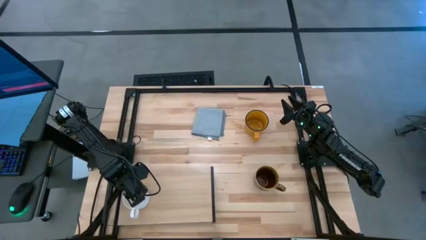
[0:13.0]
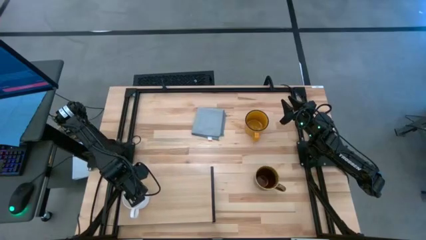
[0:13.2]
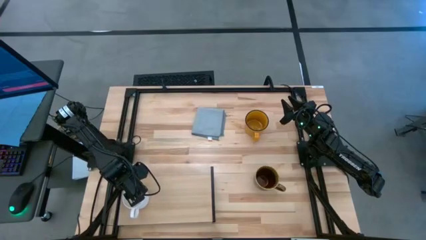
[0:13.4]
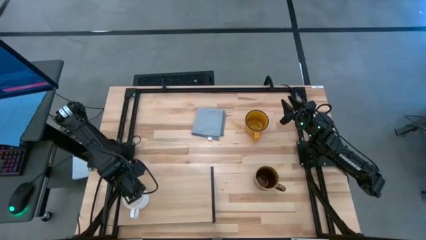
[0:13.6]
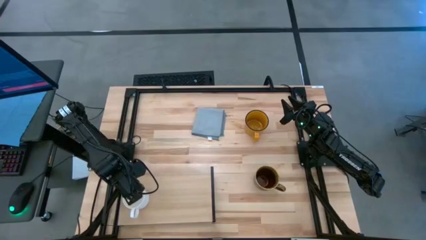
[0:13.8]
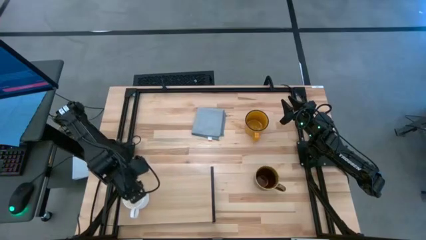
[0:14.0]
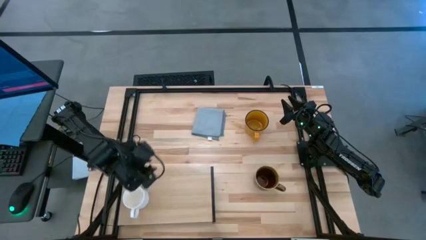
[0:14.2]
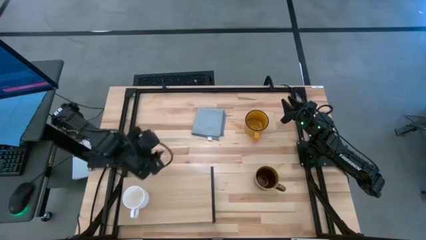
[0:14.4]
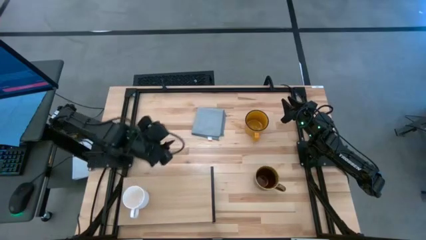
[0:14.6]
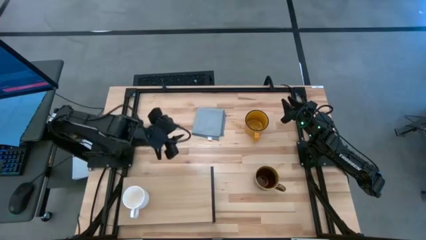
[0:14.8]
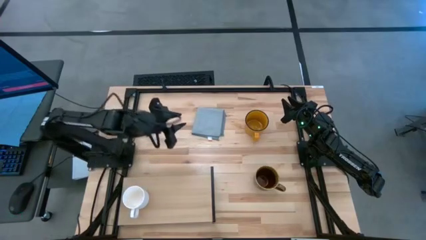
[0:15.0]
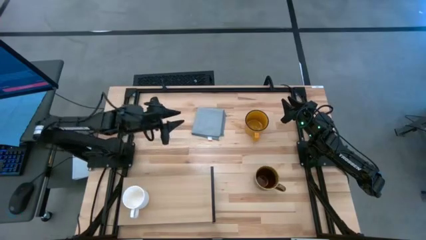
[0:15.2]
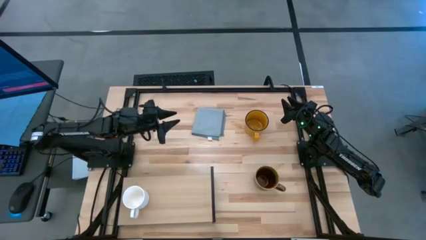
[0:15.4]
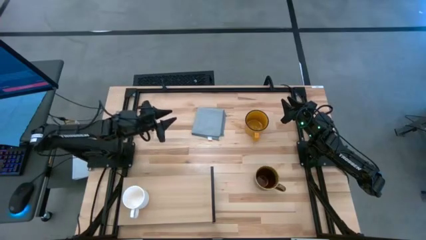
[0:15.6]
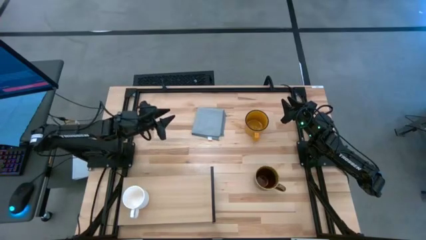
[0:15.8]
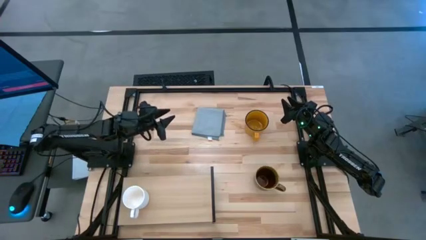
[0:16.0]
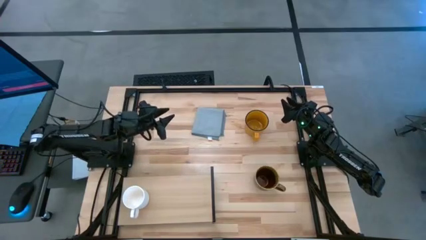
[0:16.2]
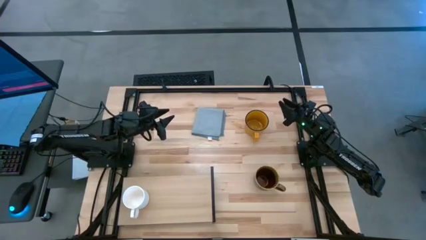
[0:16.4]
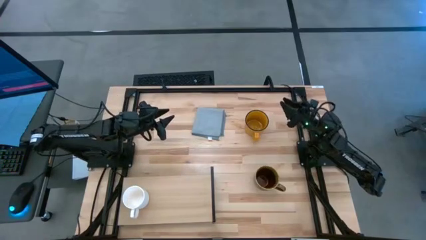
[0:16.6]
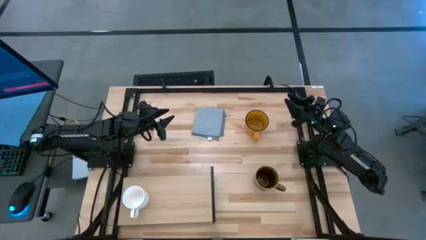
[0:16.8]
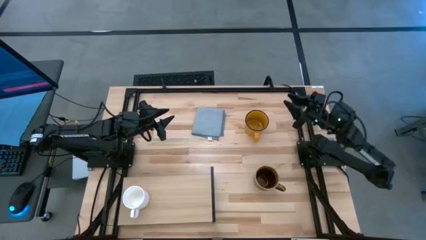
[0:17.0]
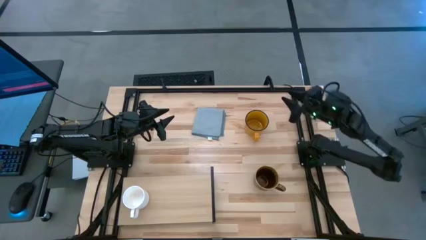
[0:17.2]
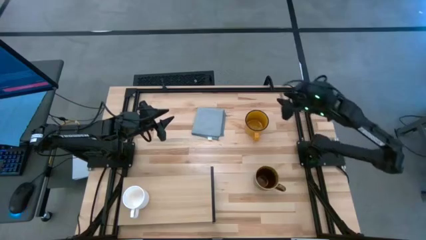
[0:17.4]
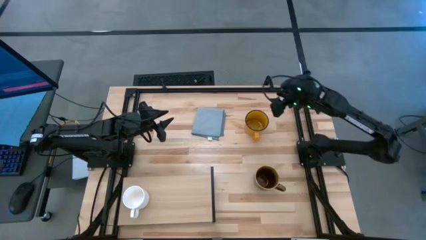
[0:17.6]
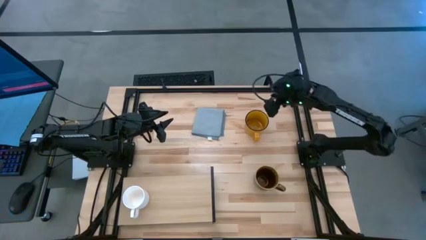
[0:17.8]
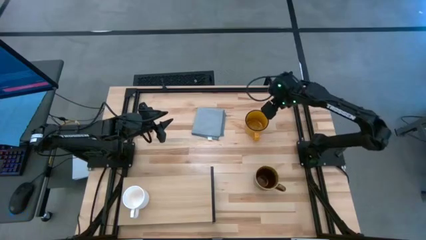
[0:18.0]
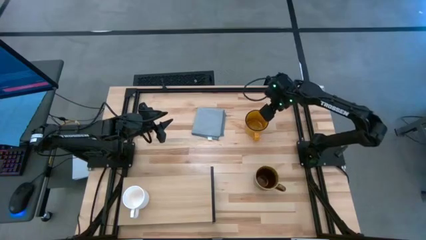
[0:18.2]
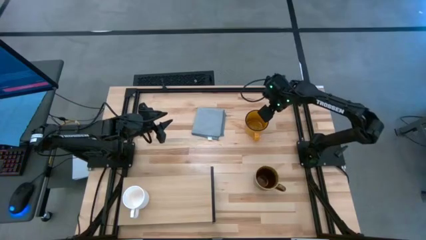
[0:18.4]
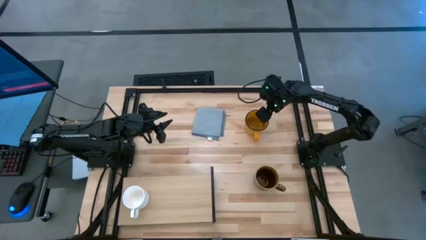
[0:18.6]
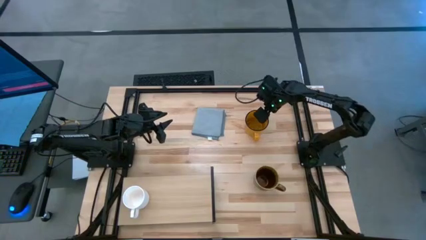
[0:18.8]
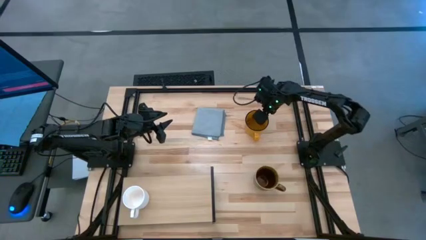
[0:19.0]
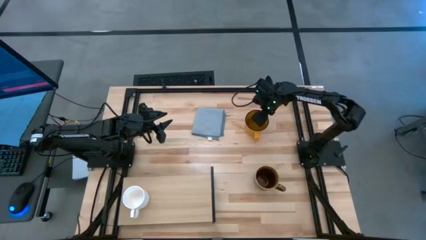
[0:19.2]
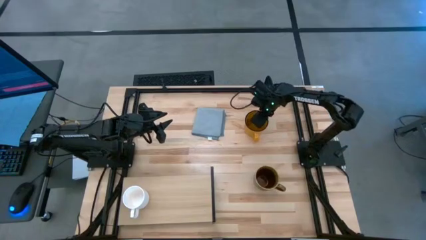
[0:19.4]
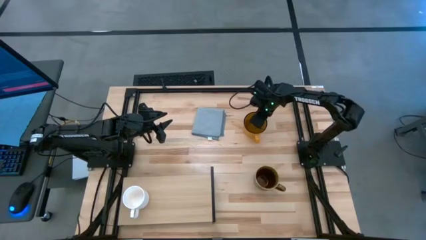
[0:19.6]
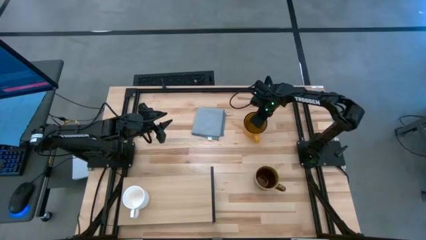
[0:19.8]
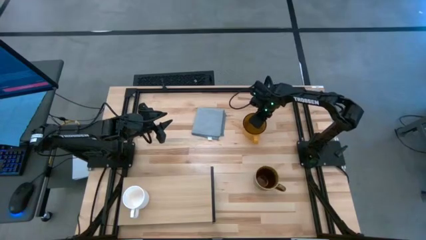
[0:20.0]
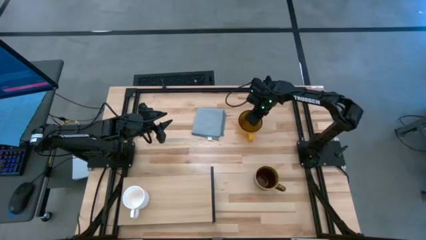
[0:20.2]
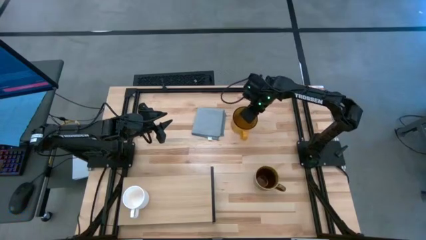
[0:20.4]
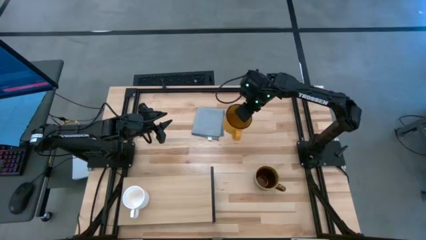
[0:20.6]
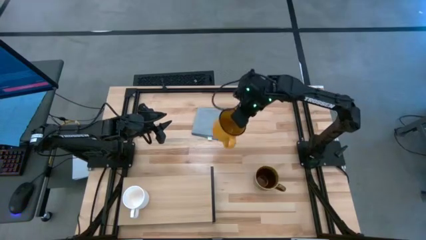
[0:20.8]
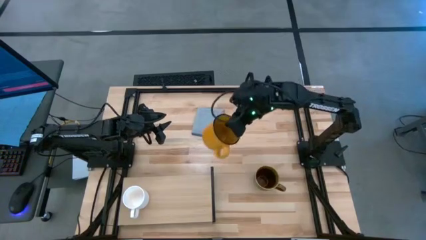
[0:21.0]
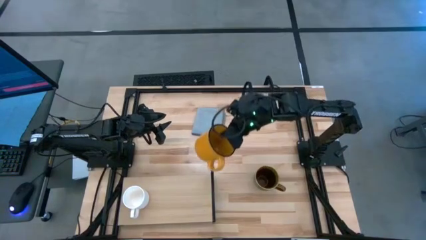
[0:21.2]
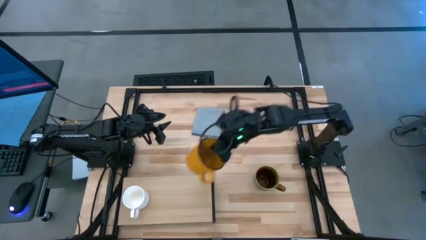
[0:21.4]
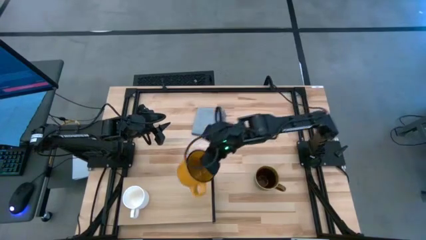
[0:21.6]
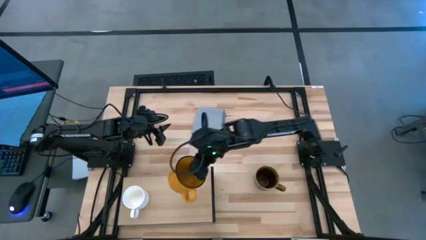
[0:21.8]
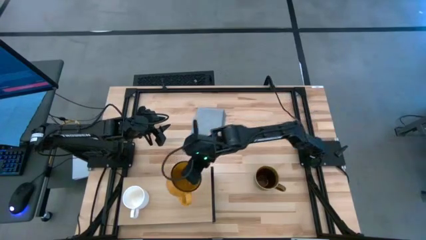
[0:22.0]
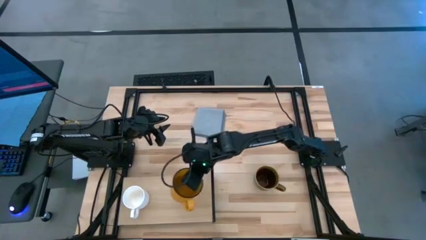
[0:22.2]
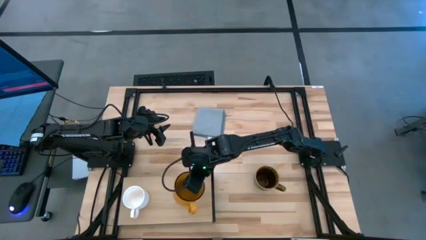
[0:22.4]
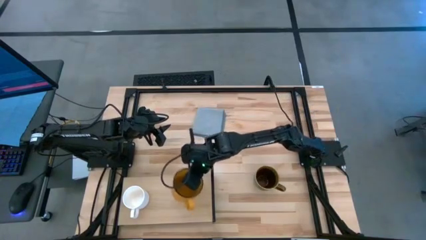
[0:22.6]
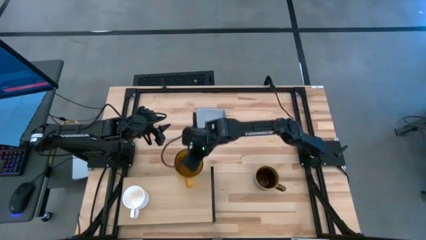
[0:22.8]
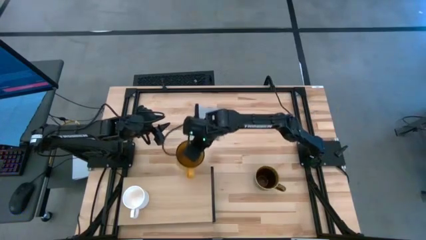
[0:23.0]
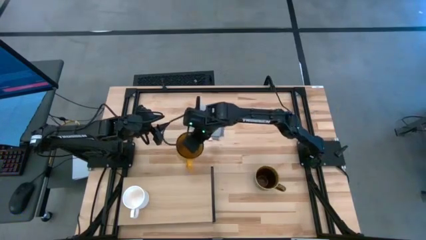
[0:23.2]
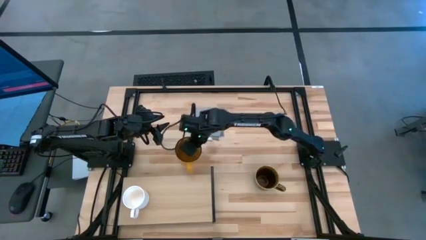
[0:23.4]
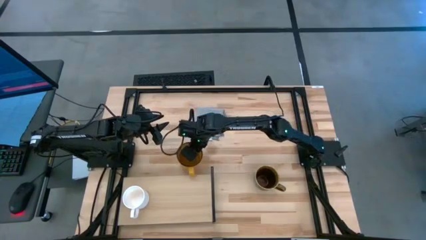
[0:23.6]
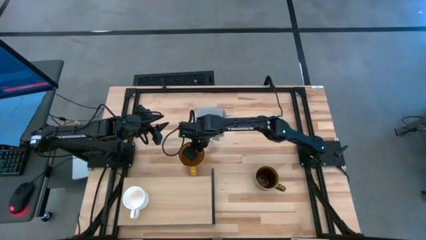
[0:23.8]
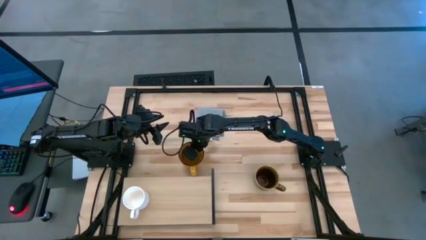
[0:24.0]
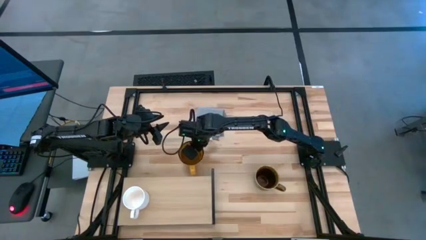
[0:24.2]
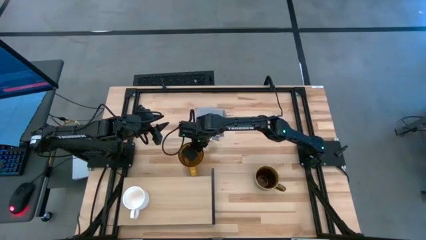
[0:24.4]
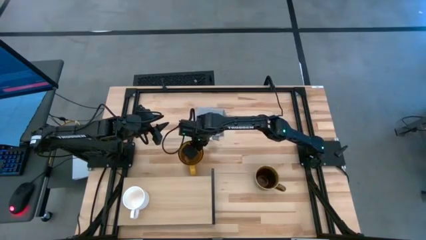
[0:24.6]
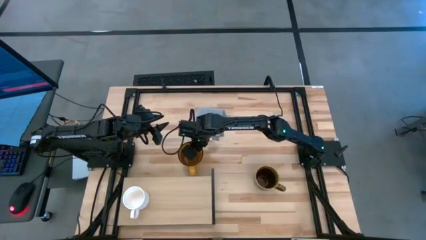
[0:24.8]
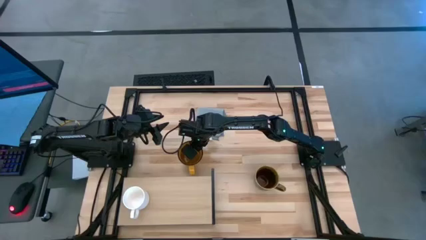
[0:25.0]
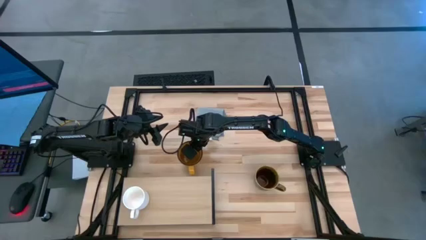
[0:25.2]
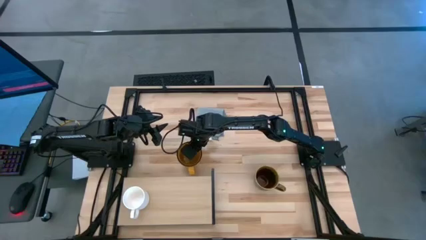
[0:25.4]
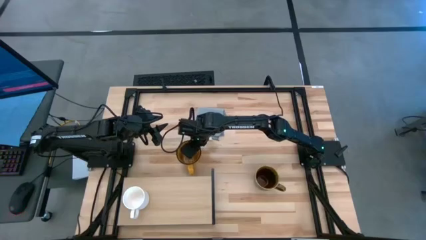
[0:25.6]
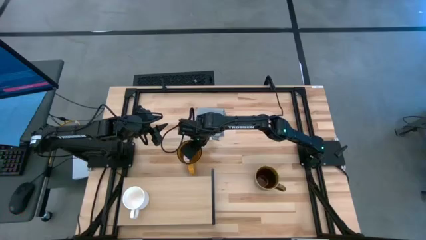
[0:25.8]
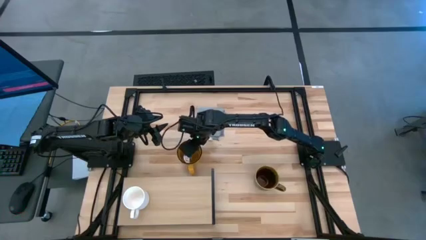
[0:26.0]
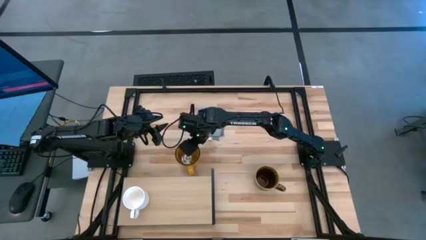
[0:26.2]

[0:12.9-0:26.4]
Task: Stack small to large cups/mugs on shelf
Put the yellow mug on the shelf
